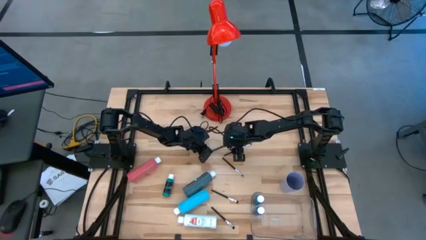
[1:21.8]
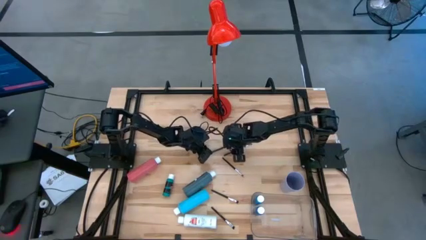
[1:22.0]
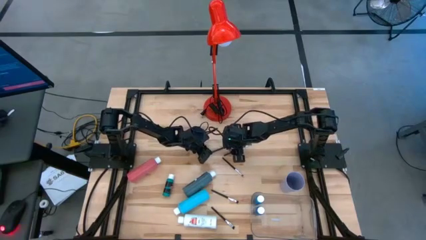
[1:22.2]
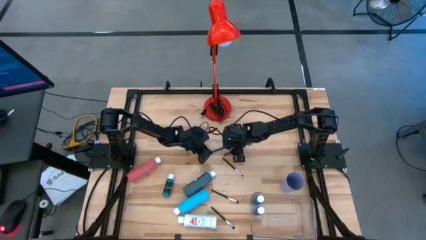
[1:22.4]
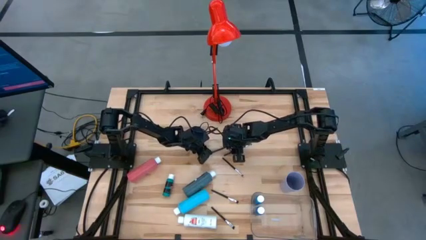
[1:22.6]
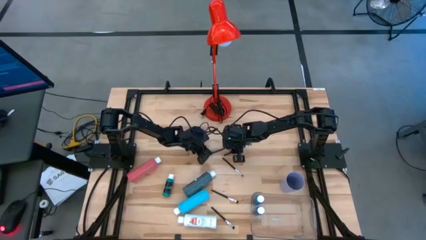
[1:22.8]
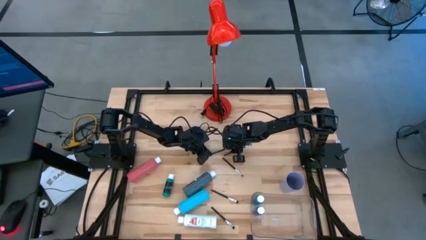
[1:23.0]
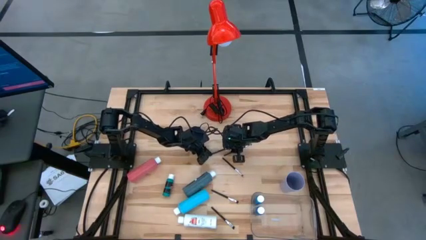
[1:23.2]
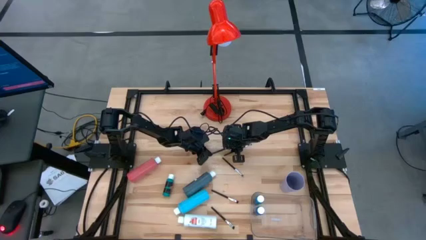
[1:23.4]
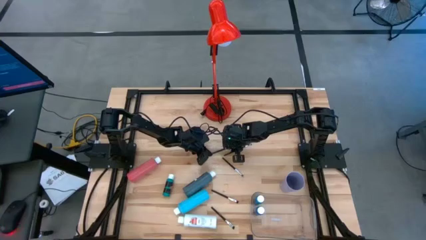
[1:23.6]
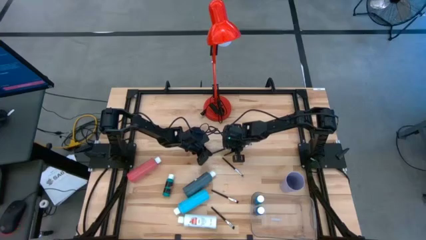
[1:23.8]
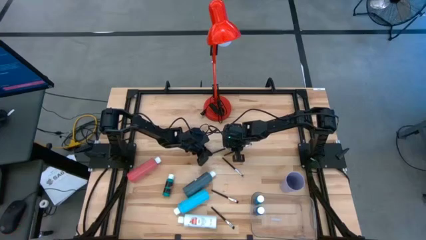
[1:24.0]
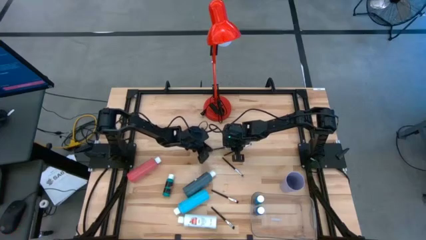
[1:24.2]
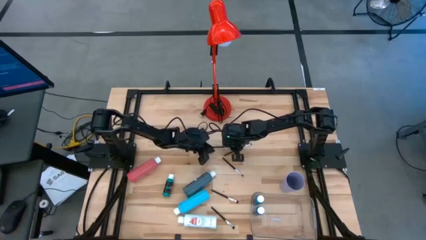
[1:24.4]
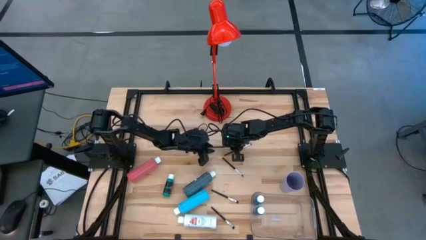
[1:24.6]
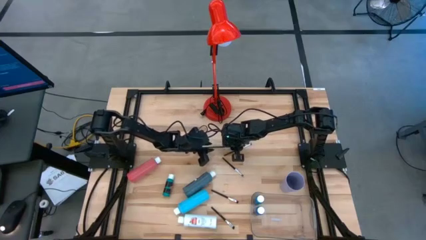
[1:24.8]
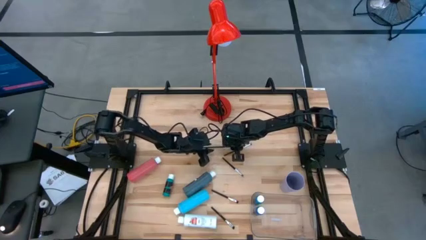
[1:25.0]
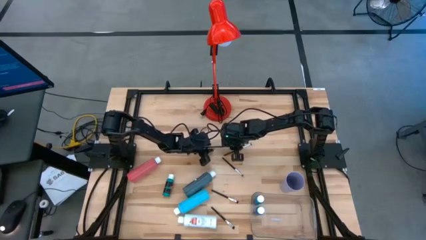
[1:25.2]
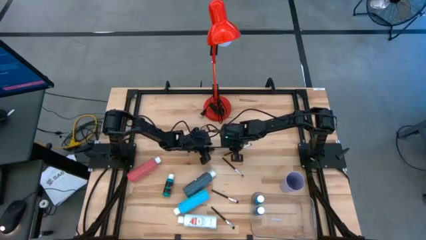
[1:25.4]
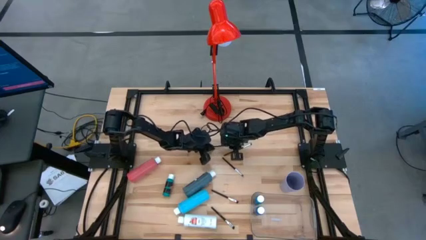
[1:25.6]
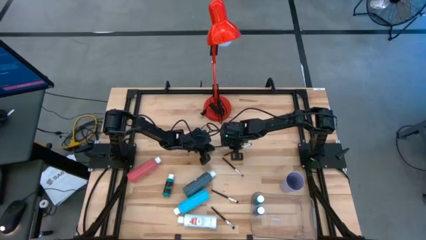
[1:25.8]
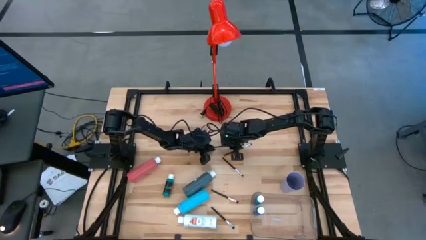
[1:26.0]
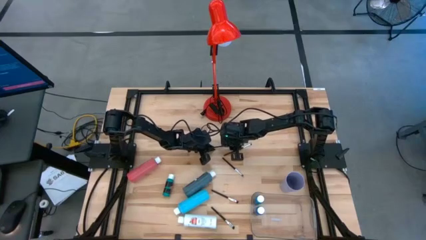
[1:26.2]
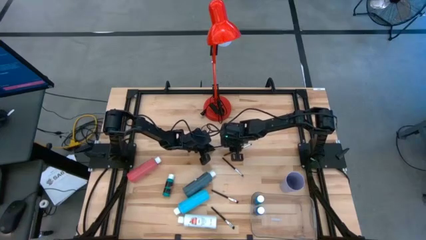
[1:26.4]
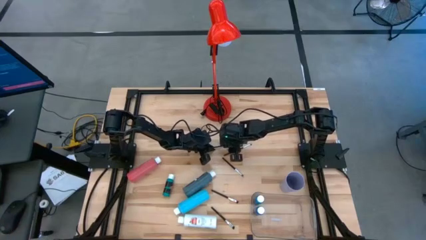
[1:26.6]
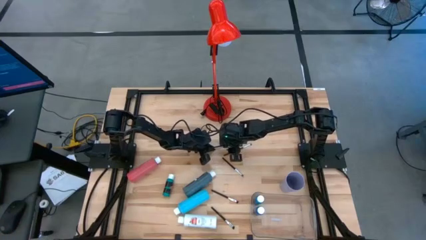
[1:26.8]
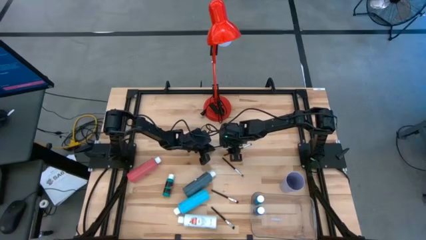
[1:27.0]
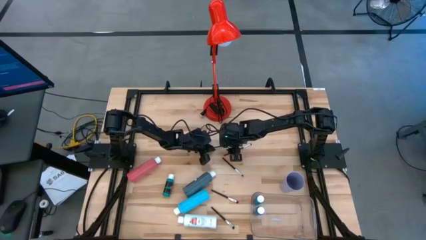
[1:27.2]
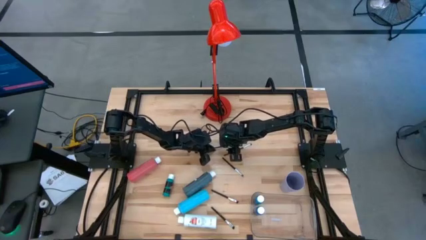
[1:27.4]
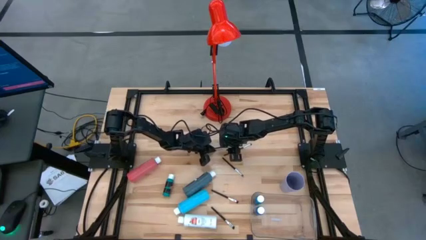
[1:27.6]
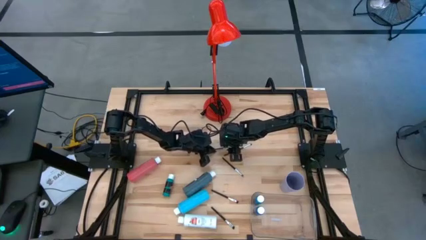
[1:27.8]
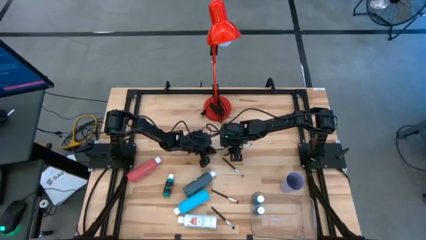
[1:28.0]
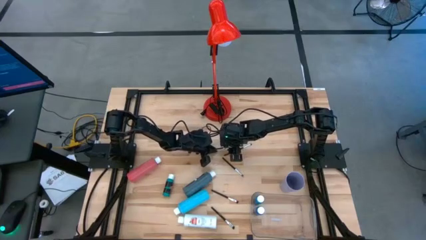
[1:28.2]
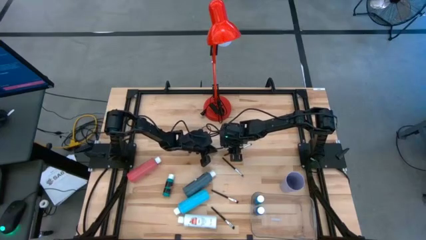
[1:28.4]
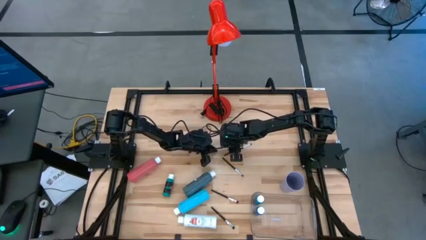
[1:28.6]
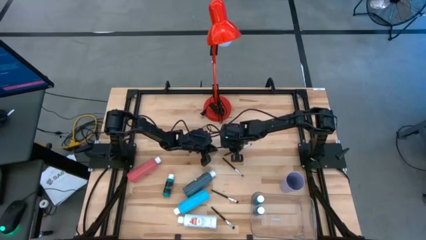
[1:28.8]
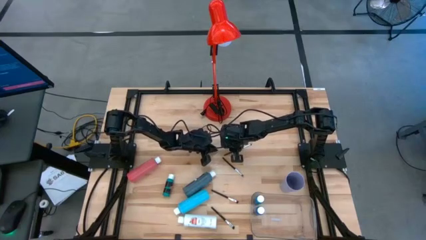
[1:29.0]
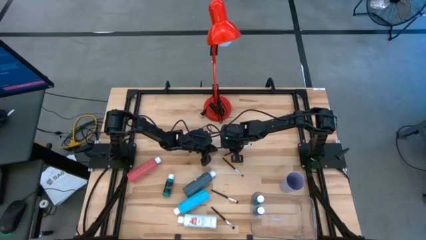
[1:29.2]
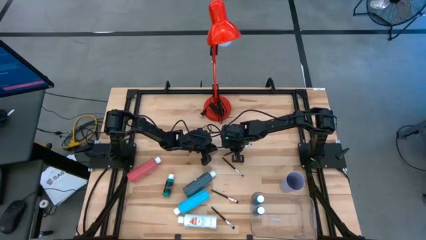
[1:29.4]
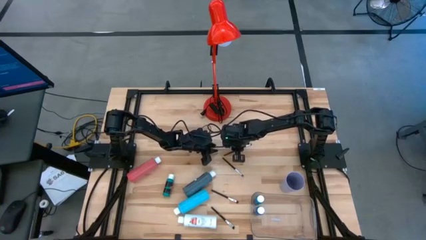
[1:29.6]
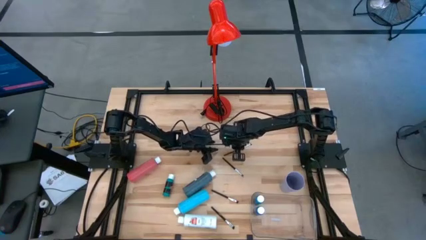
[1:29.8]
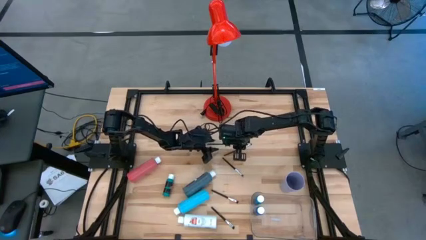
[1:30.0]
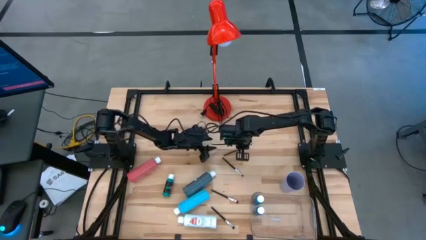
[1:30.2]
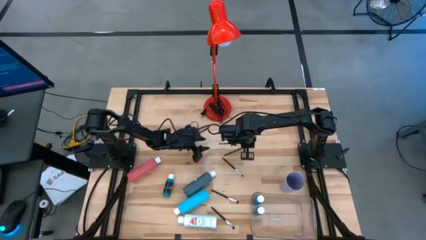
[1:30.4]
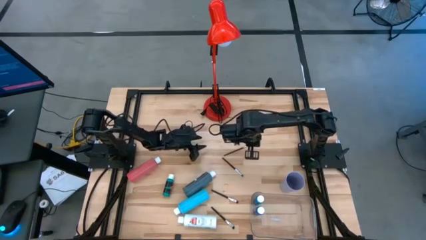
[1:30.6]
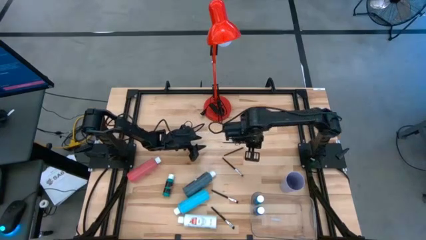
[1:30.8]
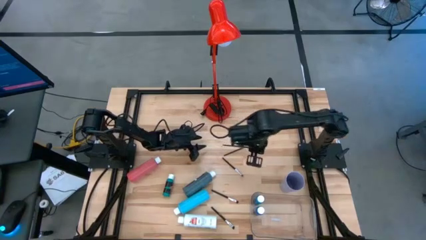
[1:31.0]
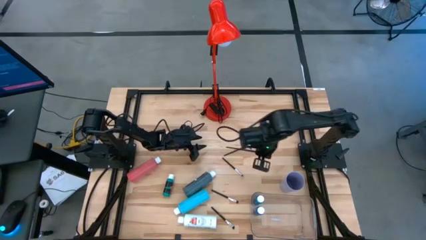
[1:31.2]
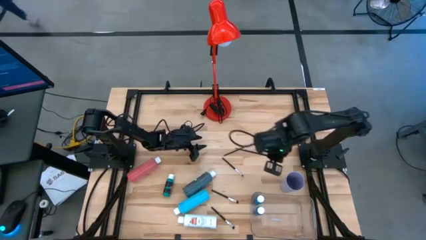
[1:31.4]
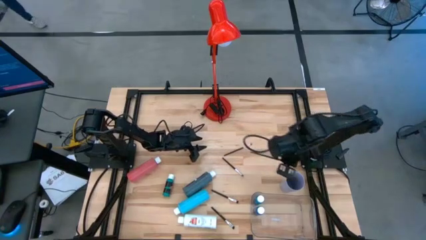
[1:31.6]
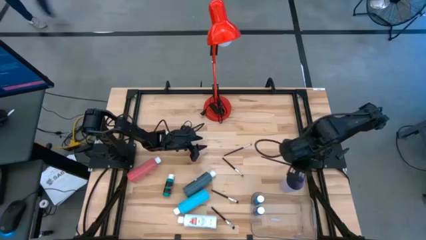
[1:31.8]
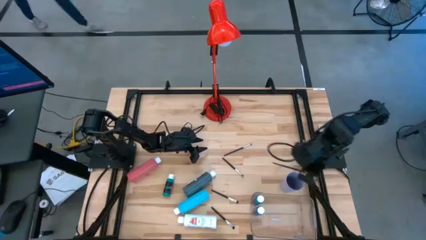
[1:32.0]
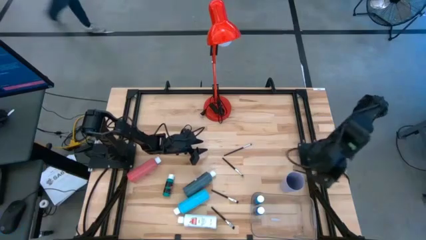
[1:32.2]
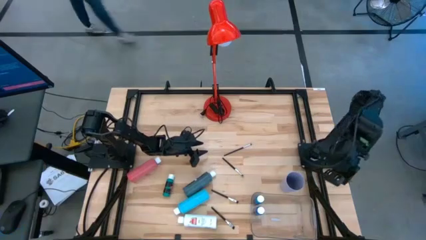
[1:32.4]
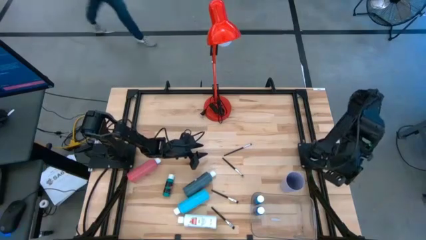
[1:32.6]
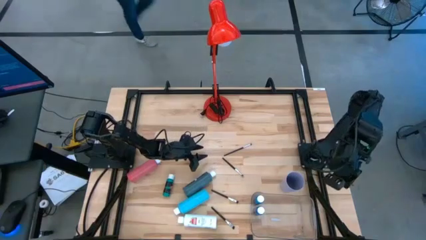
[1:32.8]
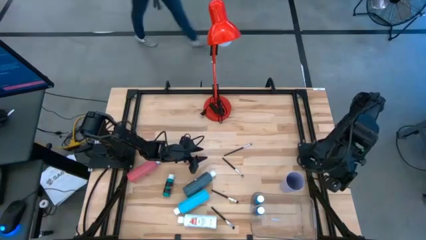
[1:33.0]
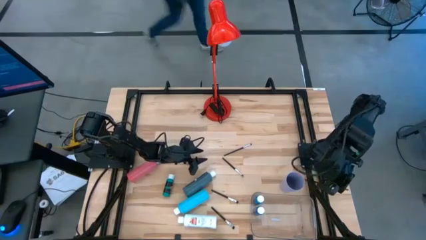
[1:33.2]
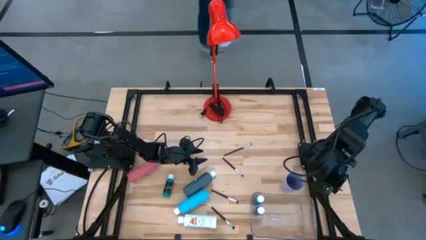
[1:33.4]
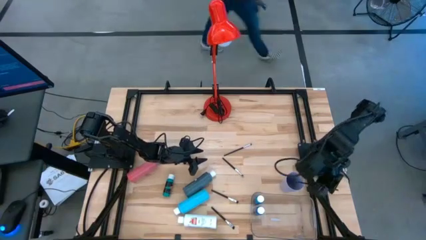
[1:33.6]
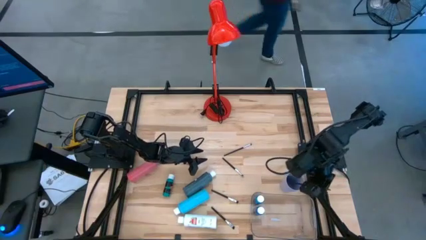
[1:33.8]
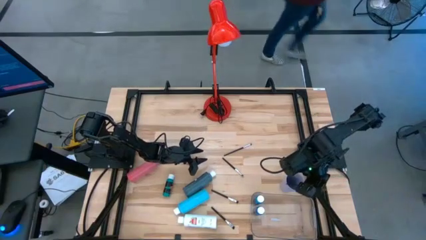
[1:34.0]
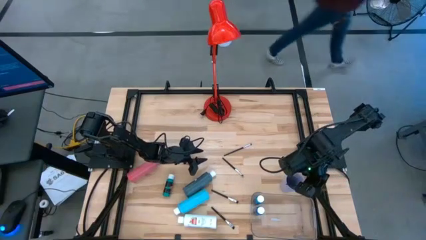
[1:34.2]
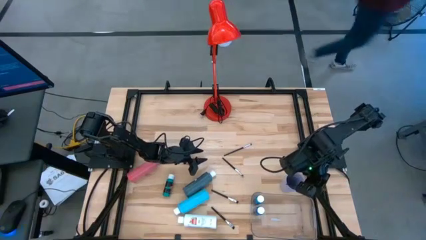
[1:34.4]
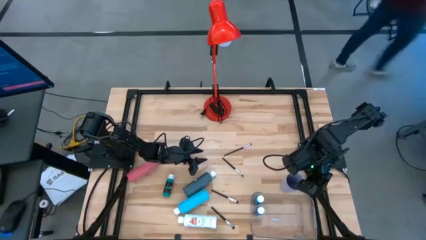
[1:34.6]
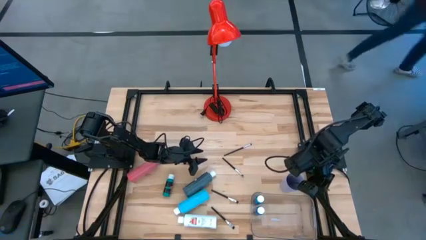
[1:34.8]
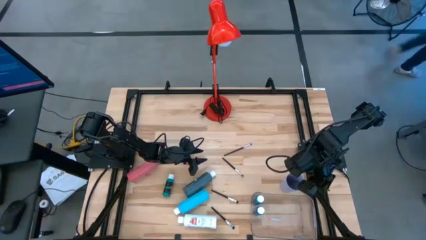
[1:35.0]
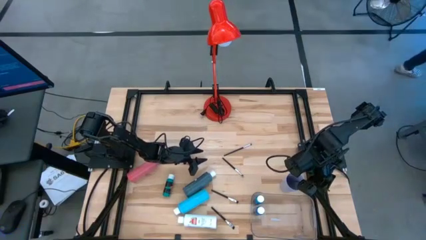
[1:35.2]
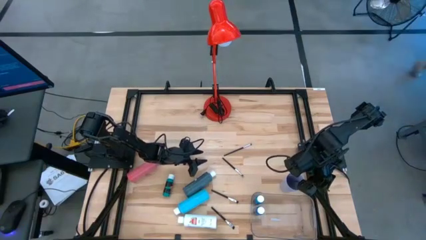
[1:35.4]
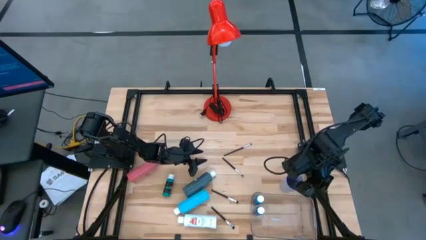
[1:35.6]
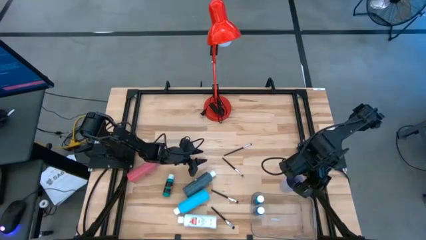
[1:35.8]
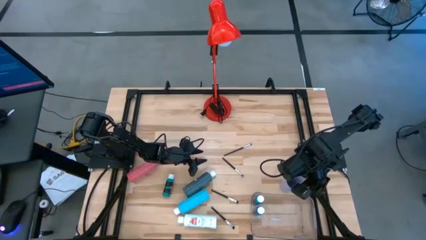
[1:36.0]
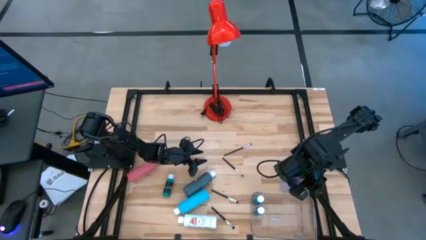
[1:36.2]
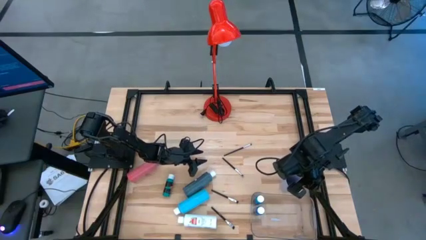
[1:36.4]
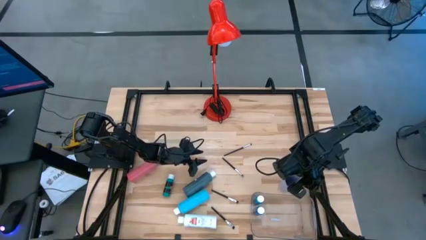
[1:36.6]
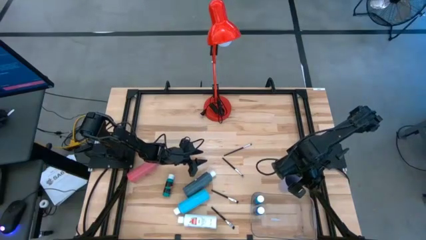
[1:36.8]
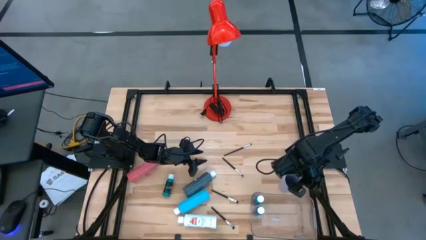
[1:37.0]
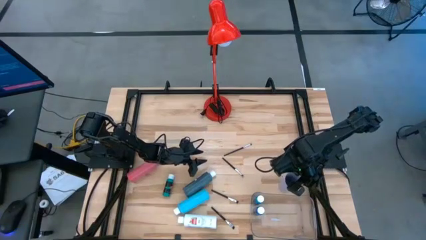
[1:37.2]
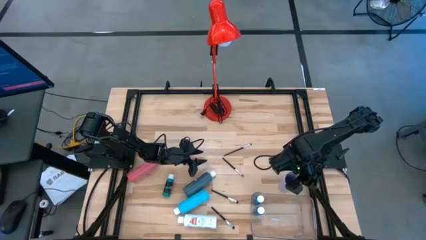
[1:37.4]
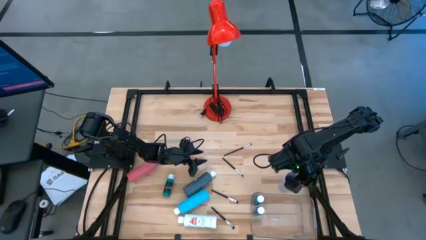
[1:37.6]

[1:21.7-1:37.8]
Task: Pick & Place Paint Supplies
Put the black gold paint brush into the purple cup
